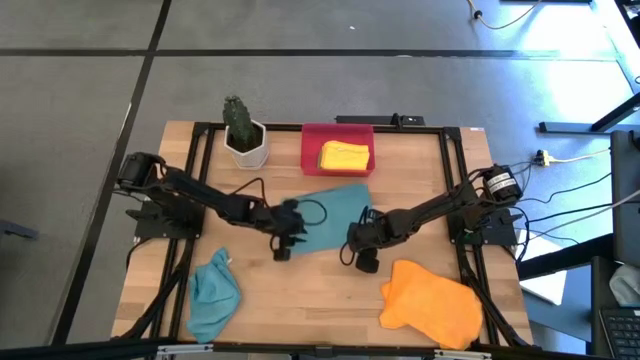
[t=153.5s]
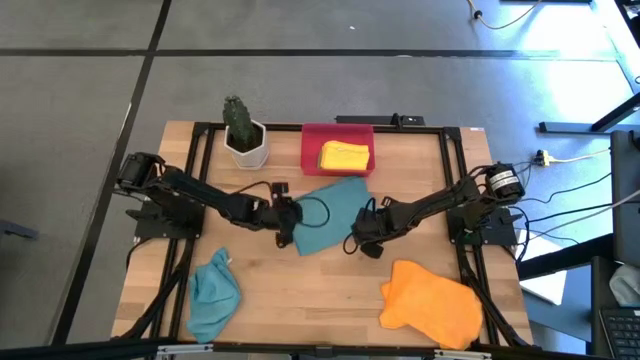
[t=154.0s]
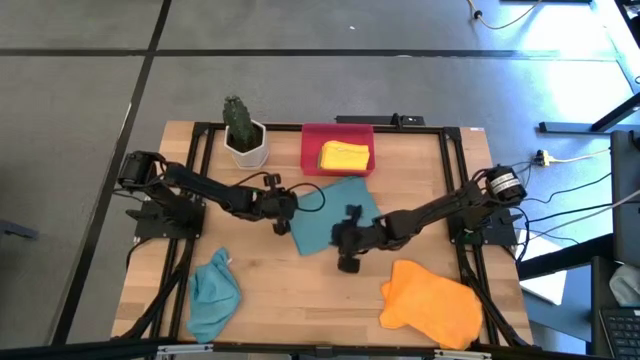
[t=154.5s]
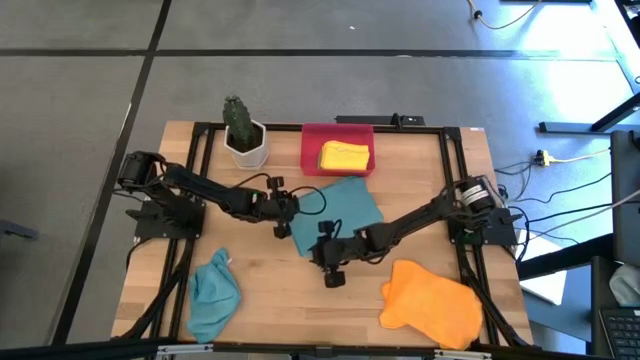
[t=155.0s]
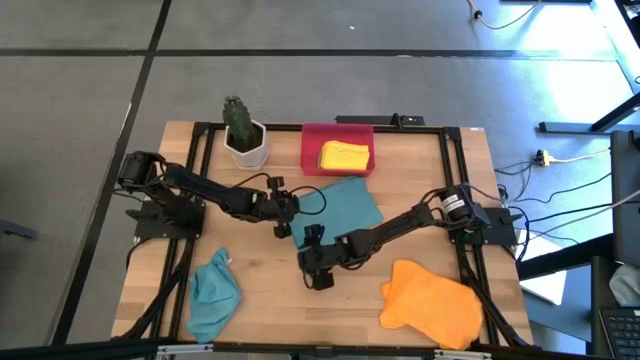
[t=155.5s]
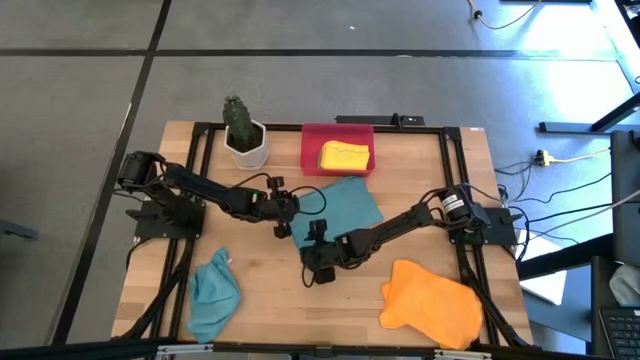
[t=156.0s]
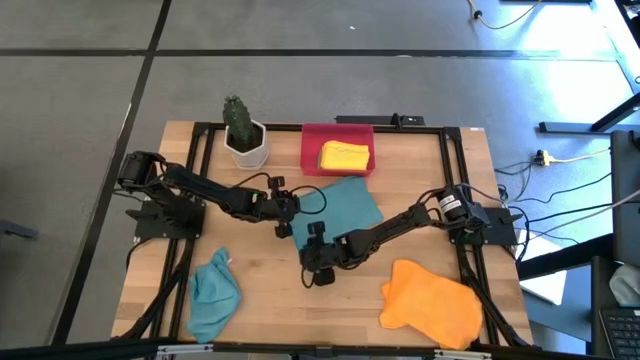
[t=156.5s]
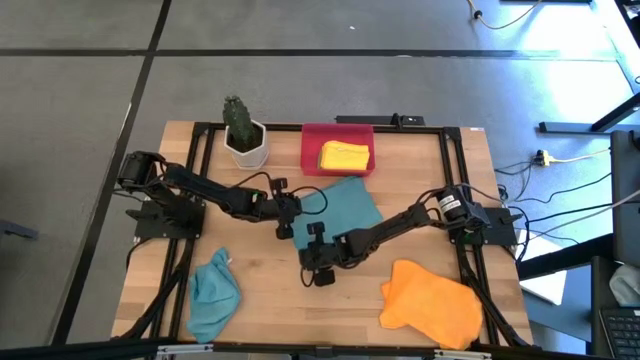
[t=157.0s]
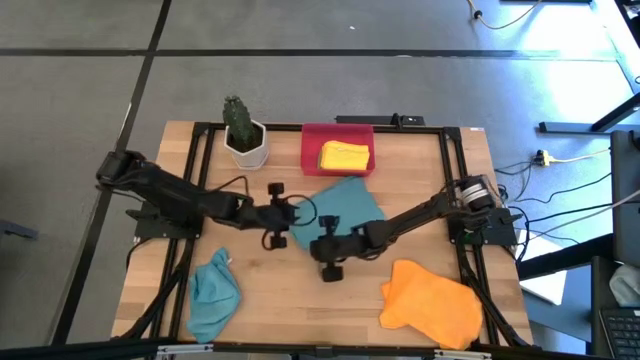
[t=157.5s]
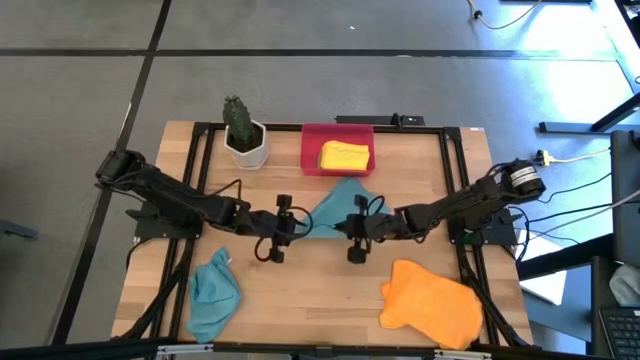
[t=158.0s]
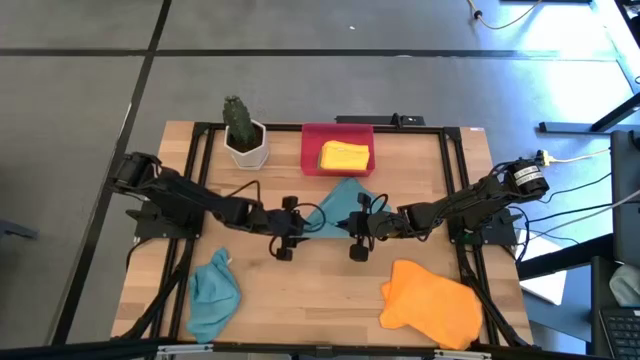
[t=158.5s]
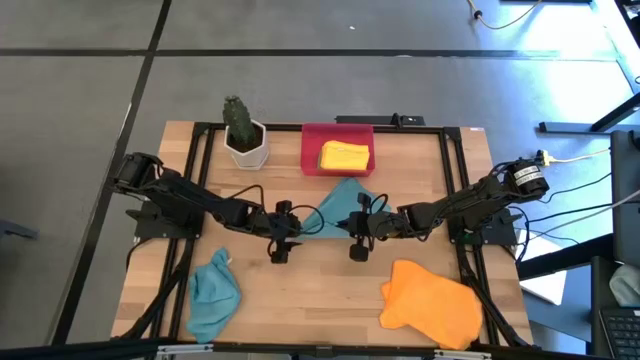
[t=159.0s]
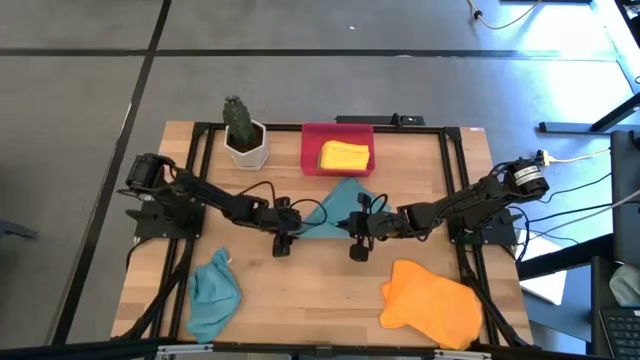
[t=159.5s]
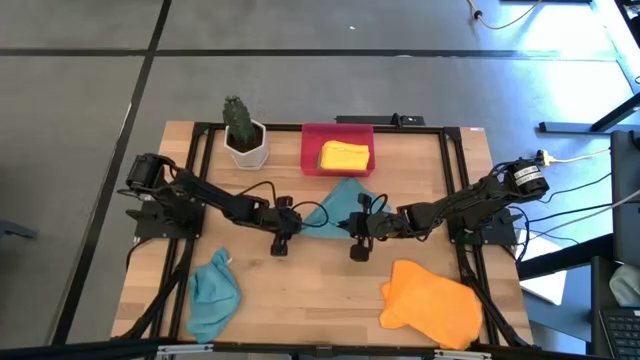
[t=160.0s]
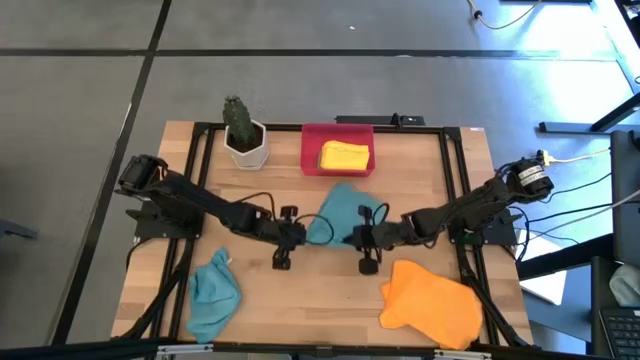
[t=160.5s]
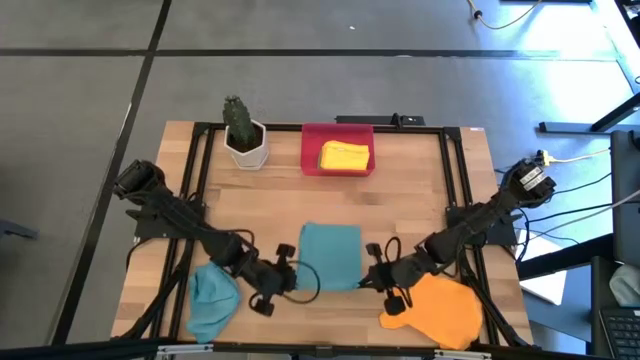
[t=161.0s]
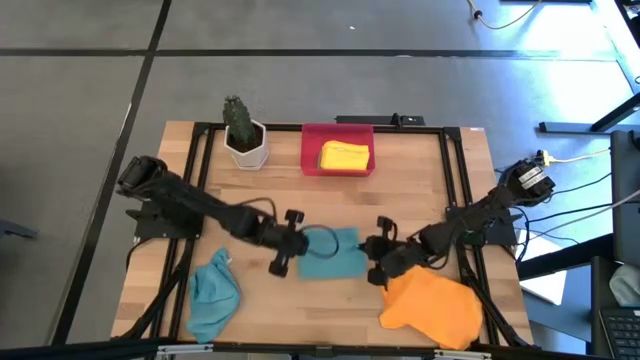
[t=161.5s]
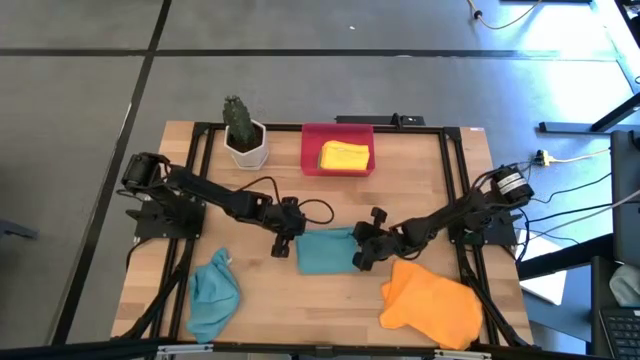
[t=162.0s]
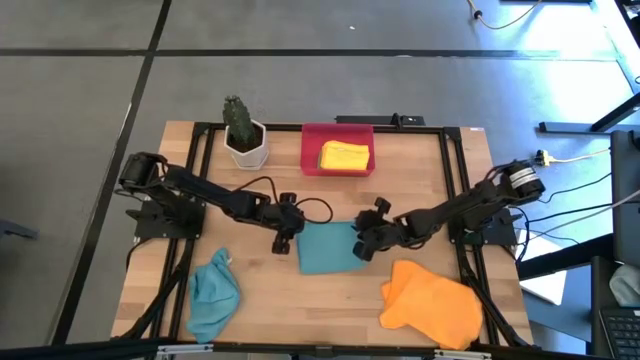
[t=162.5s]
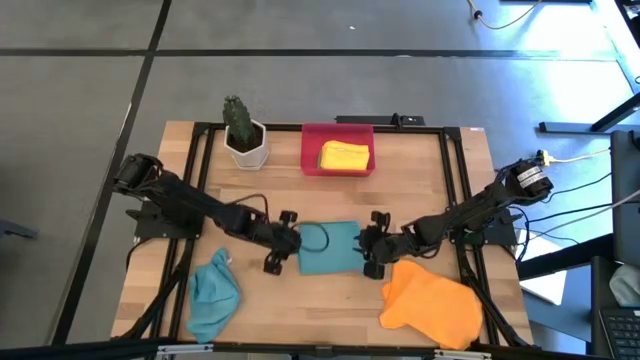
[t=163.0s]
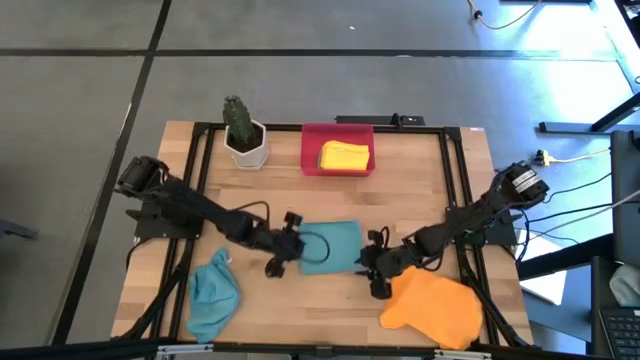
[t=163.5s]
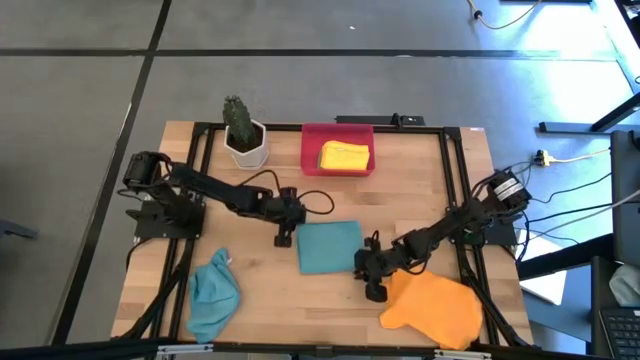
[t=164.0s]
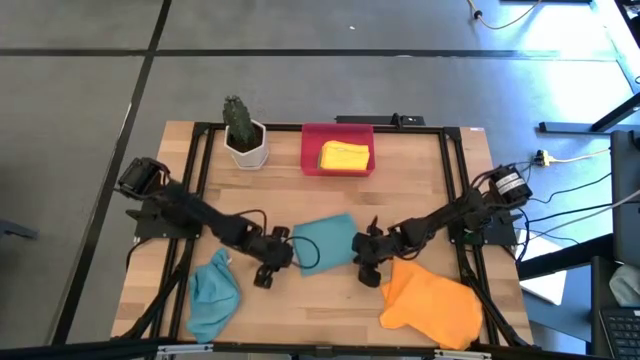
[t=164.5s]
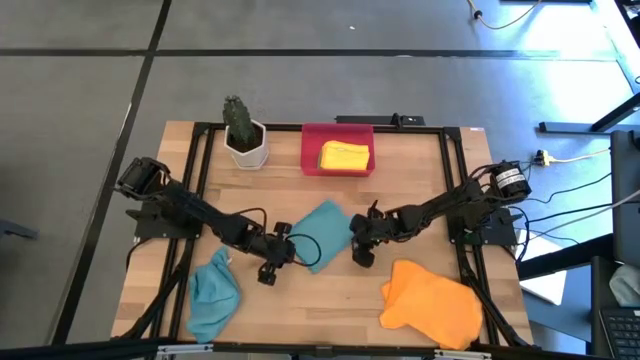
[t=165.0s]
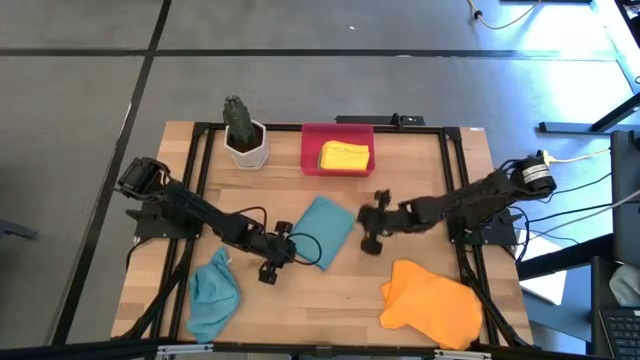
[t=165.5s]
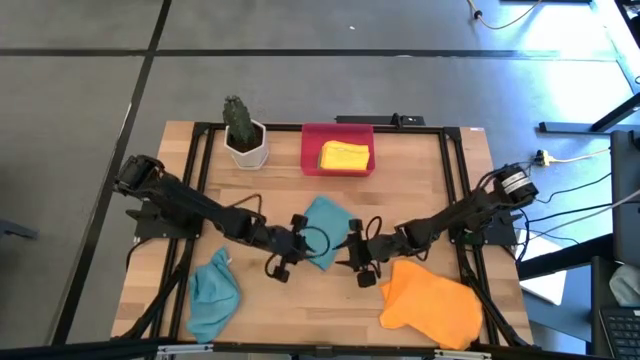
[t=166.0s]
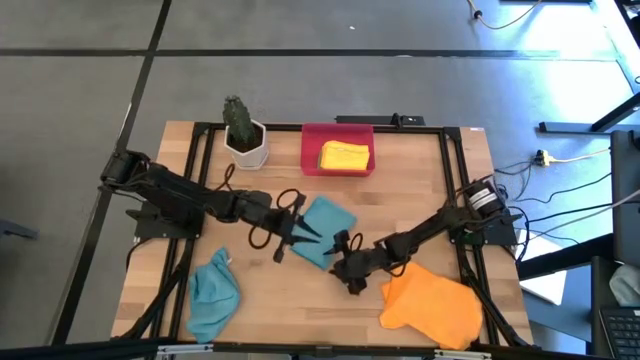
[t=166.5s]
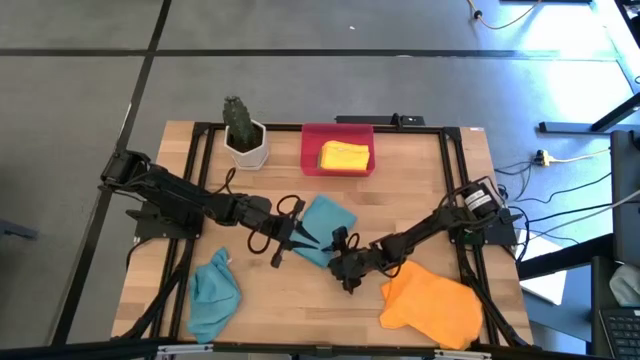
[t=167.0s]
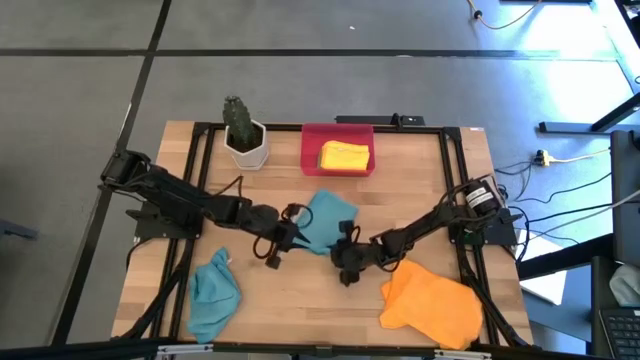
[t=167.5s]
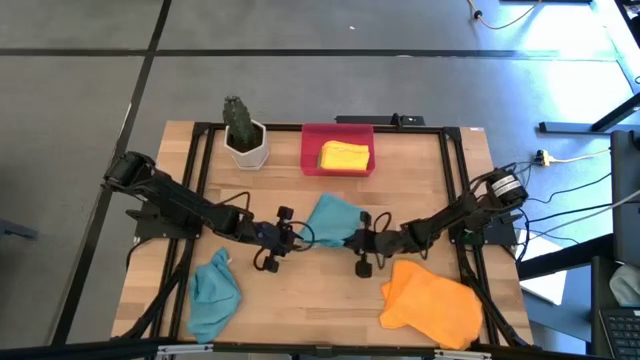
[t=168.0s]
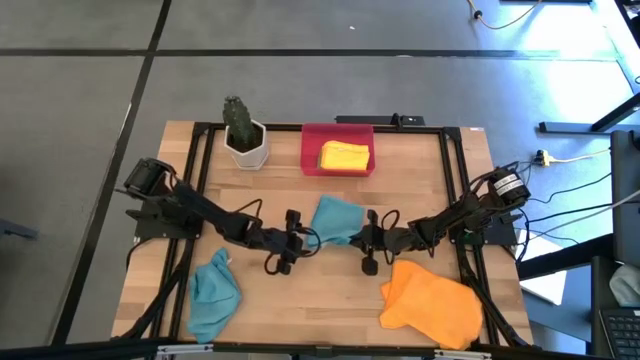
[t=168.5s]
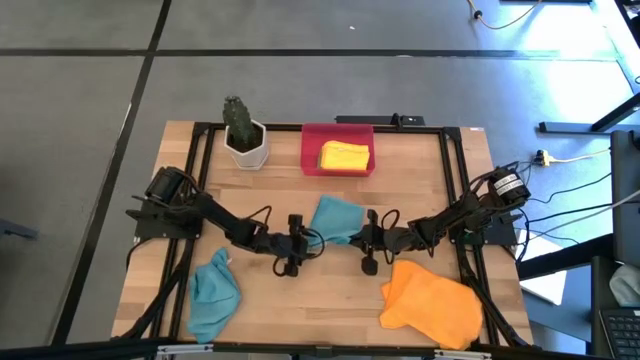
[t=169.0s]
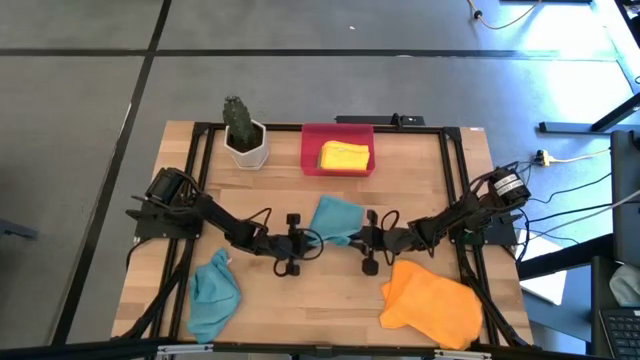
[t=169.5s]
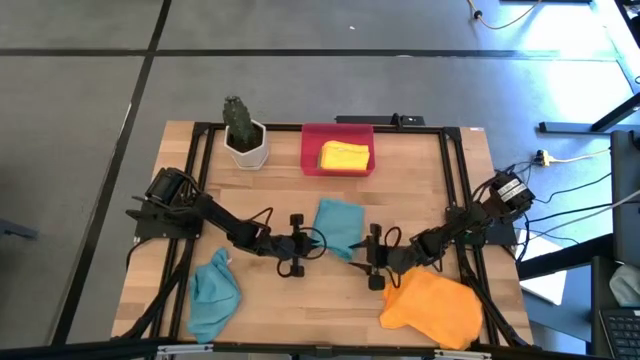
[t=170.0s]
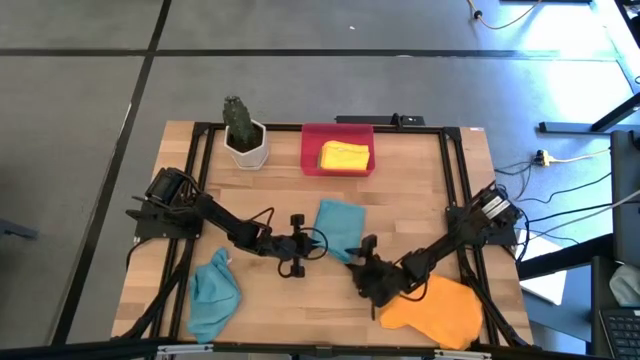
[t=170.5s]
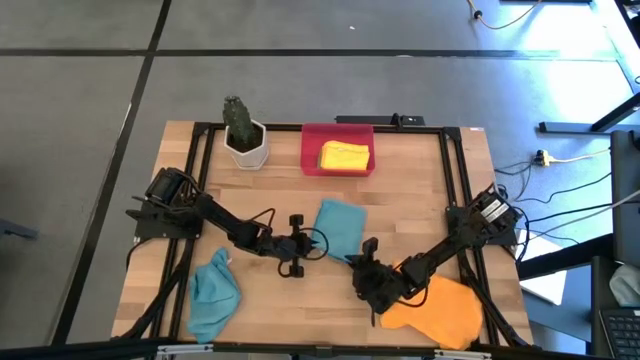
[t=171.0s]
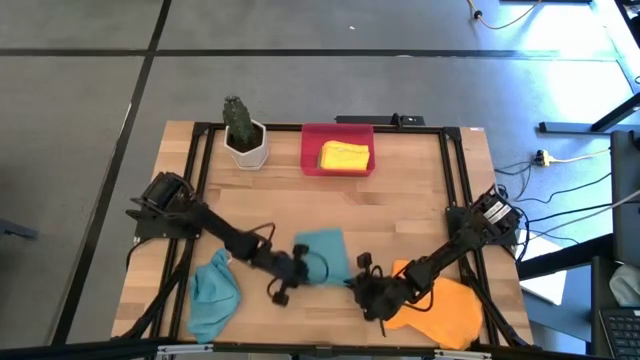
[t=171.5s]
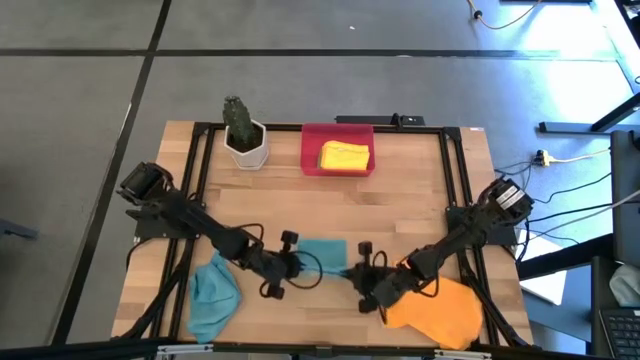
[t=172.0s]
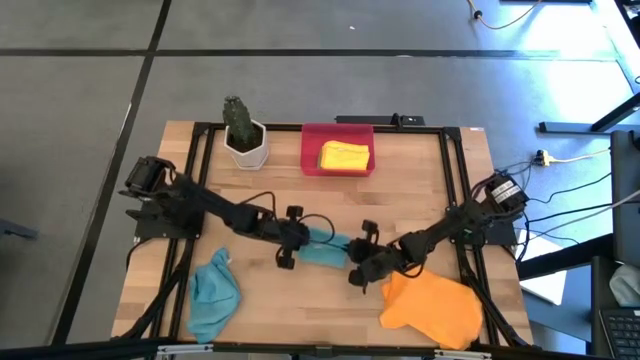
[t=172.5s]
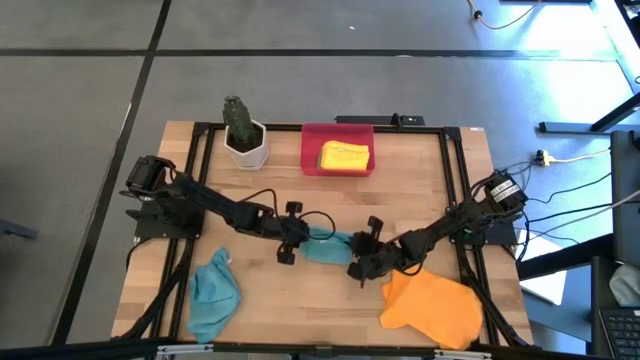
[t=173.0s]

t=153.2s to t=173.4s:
Task: Fold microfiber towels
Fold the top blue microfiber cloth

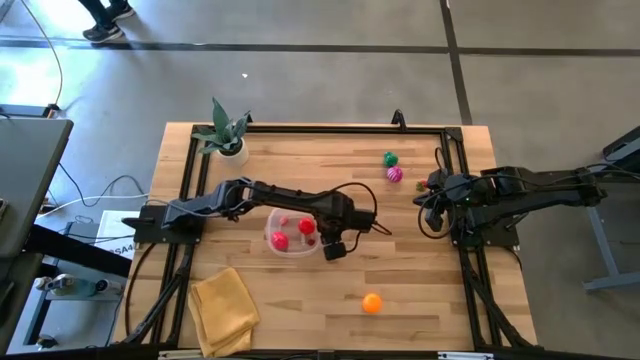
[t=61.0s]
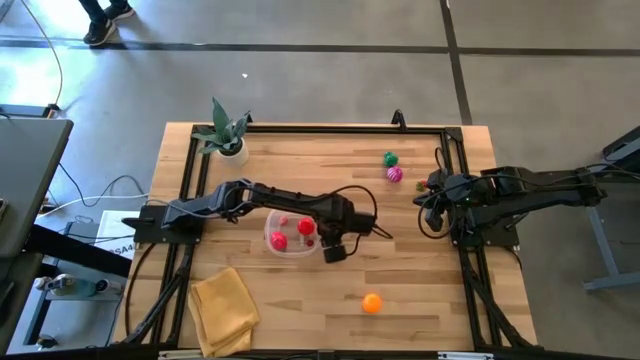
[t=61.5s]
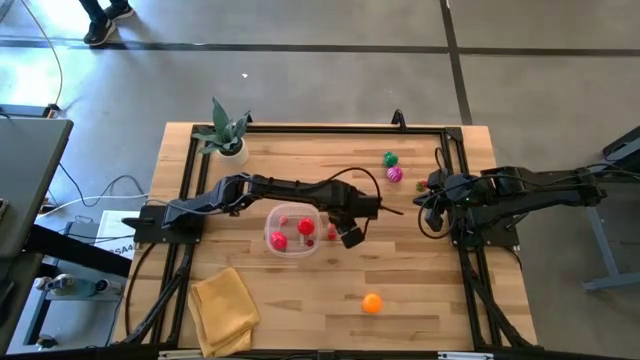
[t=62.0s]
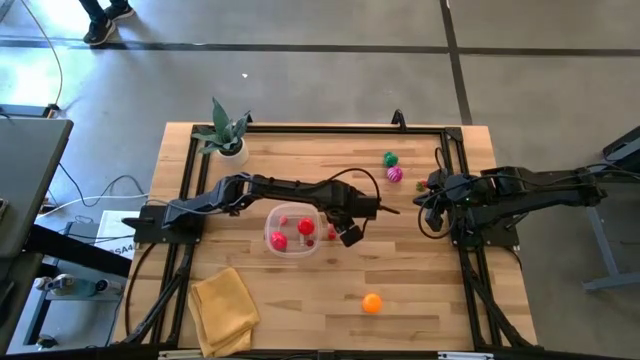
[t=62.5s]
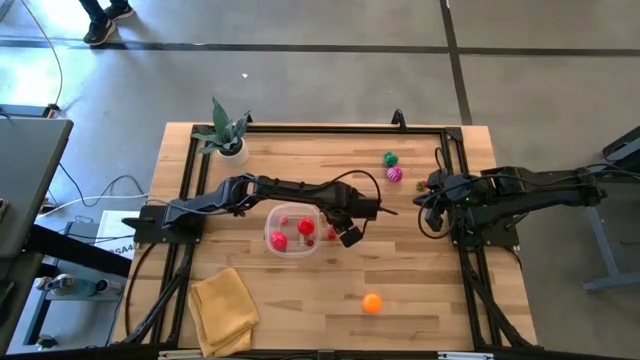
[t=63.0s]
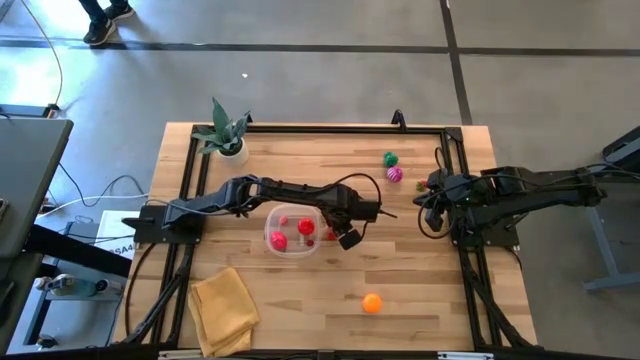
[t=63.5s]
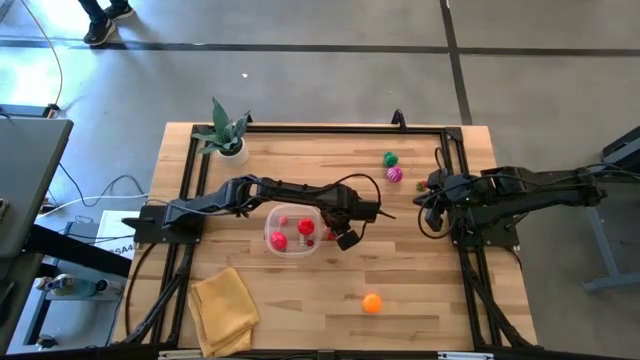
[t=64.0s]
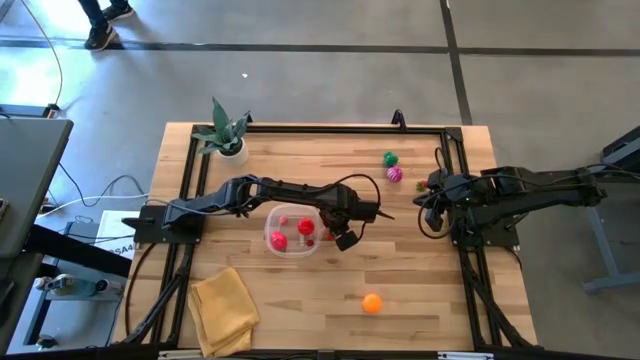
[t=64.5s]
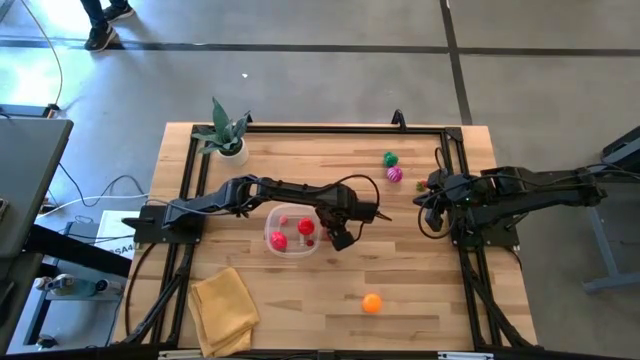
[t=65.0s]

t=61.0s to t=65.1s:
Task: Pick and placing Produce into tupperware
Put the pink peach into the transparent container
